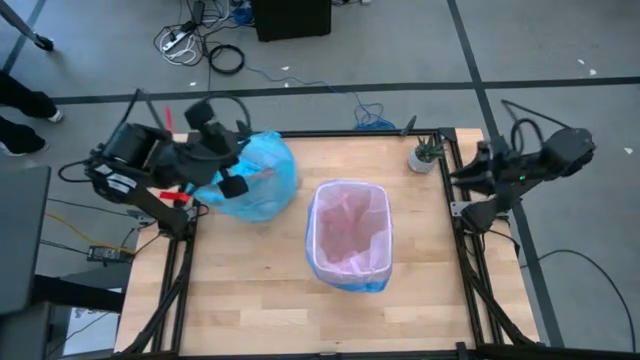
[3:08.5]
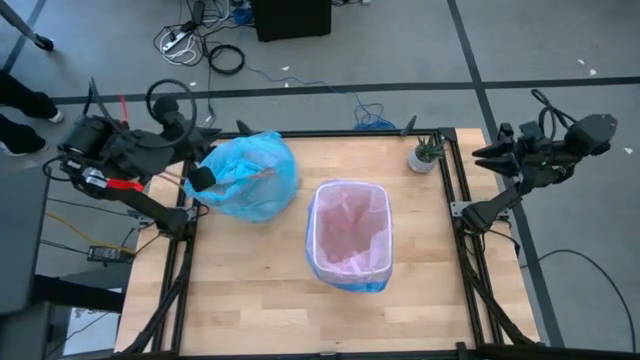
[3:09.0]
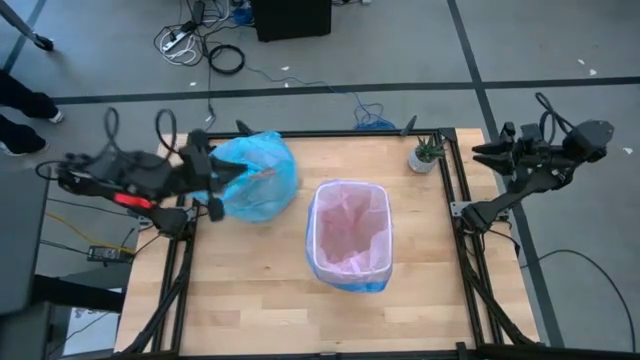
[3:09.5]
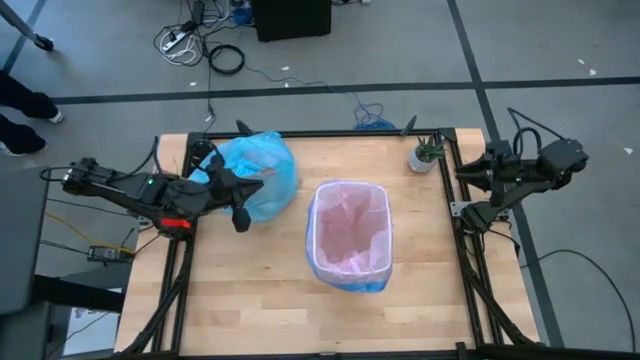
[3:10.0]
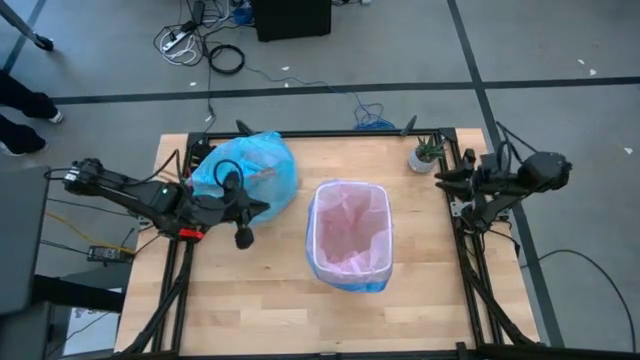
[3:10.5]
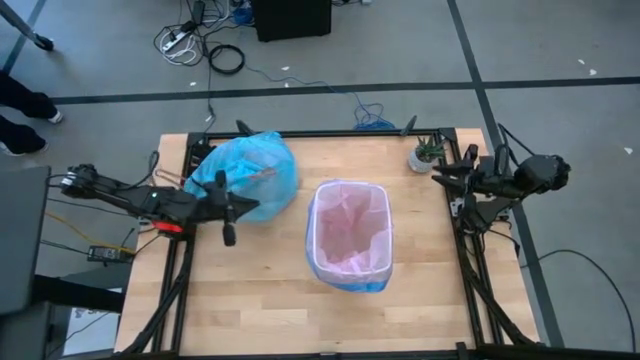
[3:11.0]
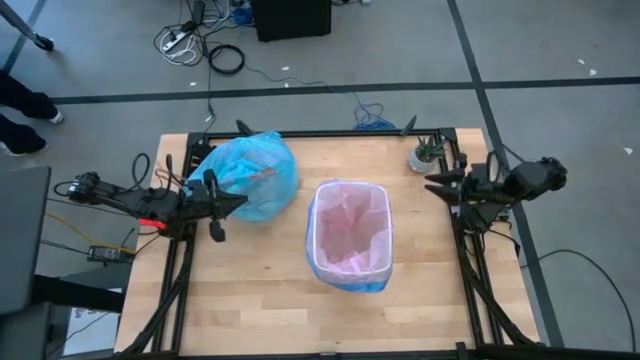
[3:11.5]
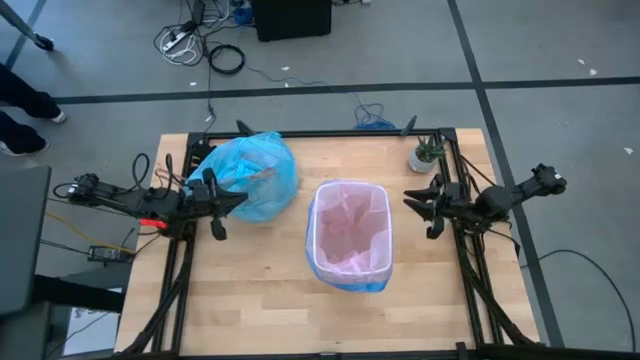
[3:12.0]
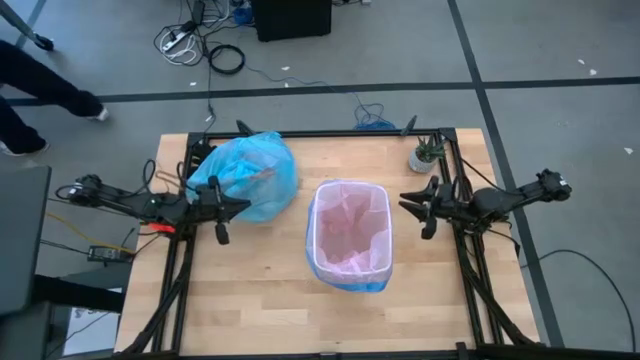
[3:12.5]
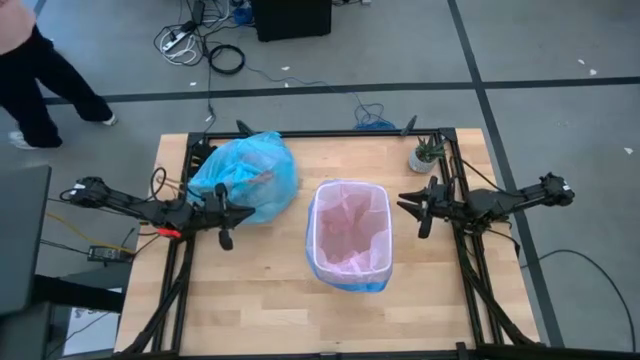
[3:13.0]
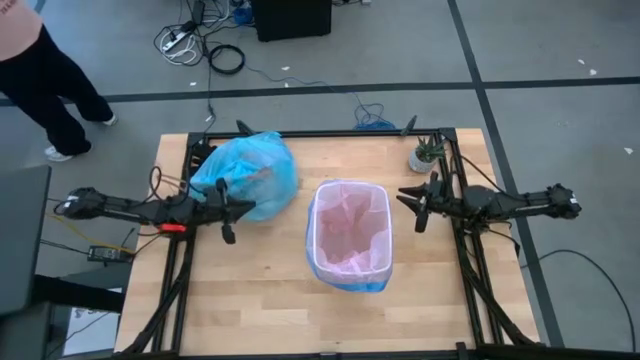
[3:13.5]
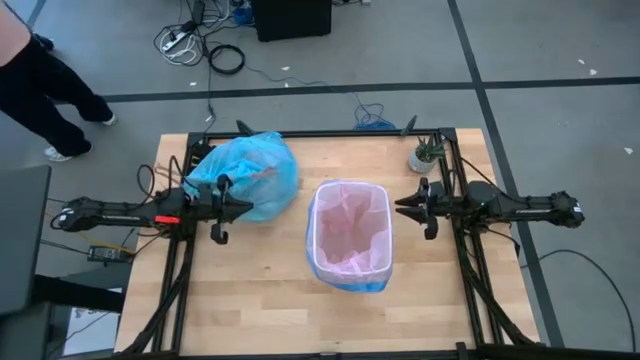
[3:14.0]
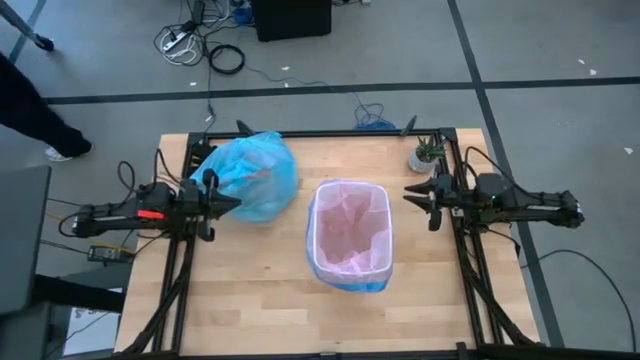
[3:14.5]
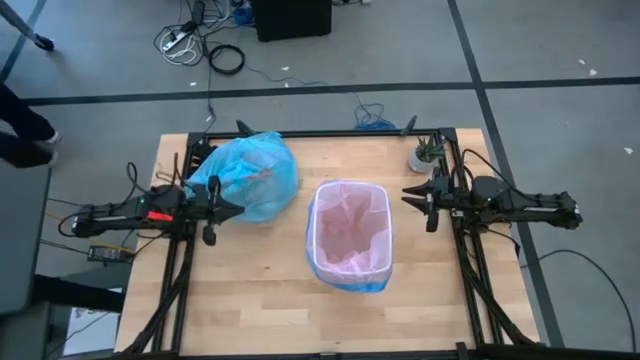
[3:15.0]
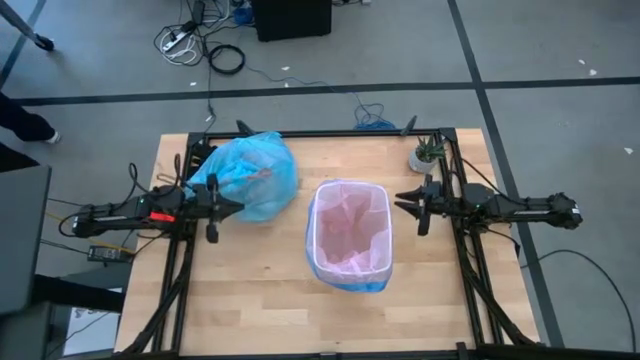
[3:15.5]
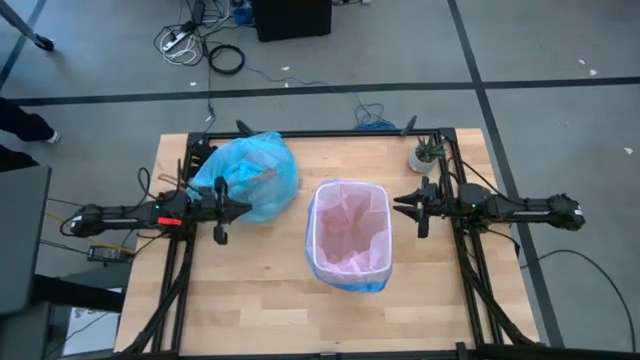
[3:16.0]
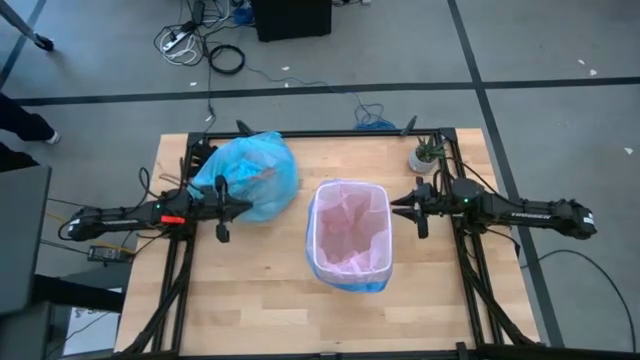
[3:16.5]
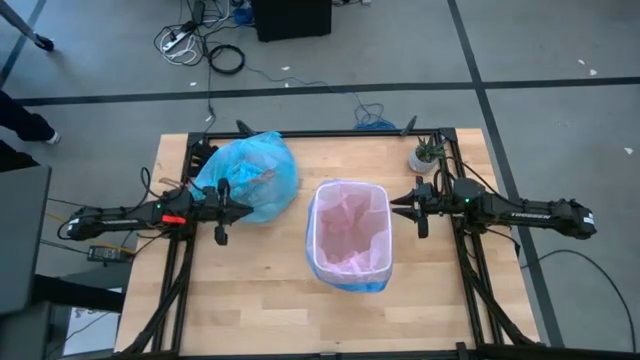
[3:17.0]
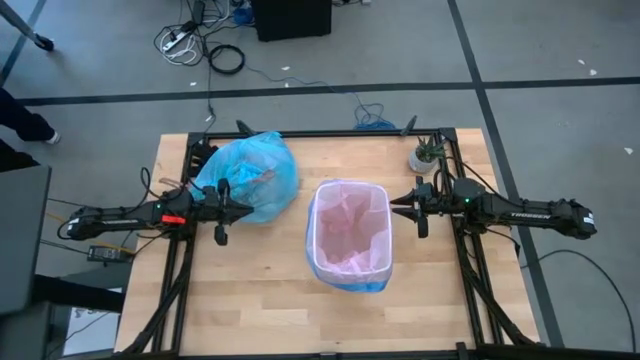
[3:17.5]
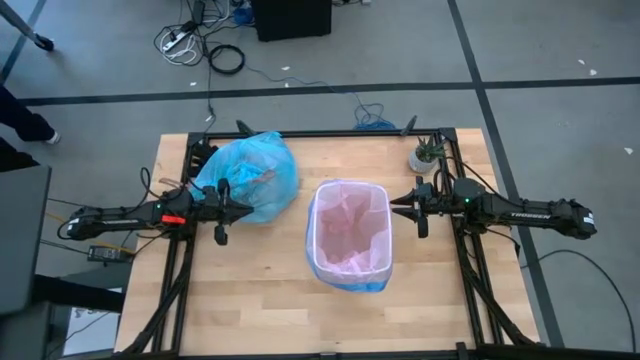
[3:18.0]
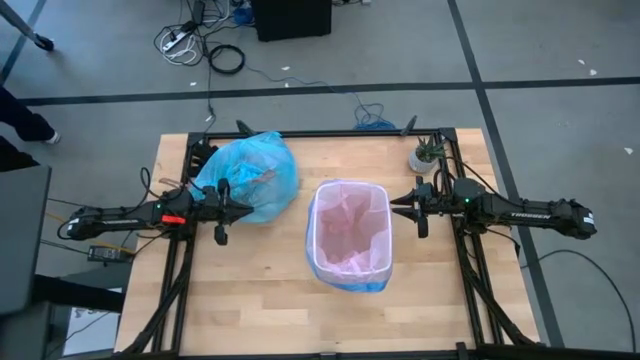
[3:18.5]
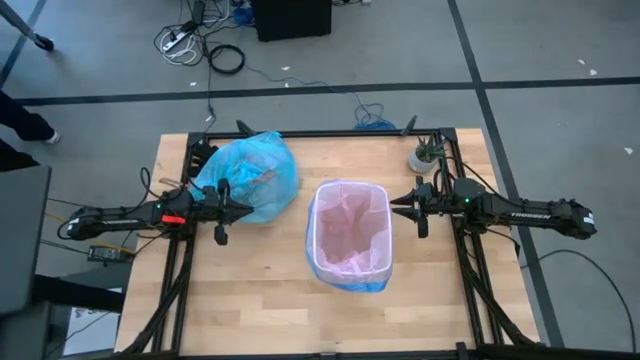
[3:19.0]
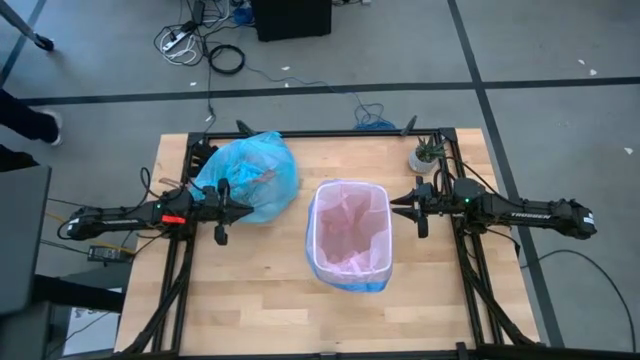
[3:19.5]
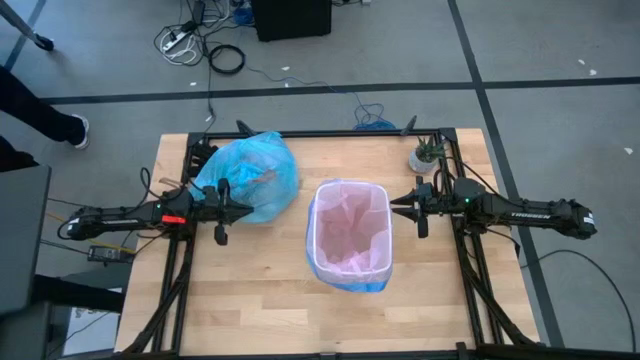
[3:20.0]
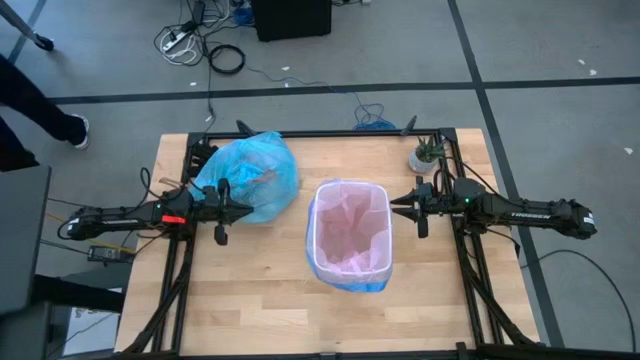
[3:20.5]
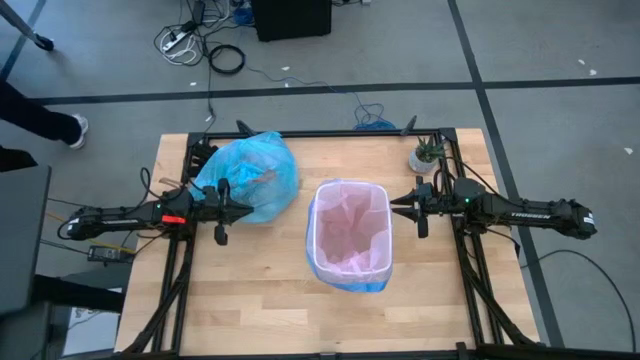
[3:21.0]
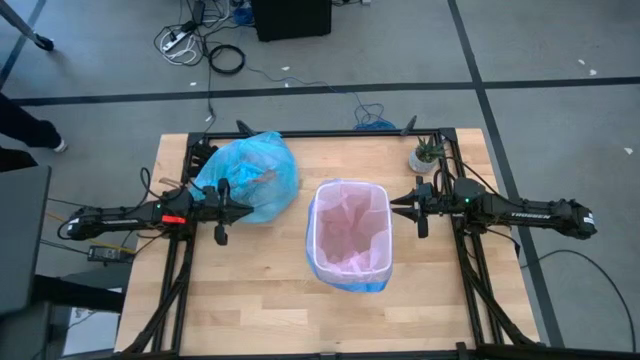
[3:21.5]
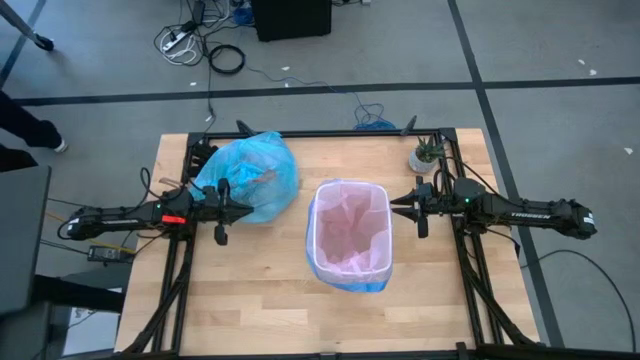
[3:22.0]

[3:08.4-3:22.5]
Task: place trash/remove bag and relplace
Return to Home Position

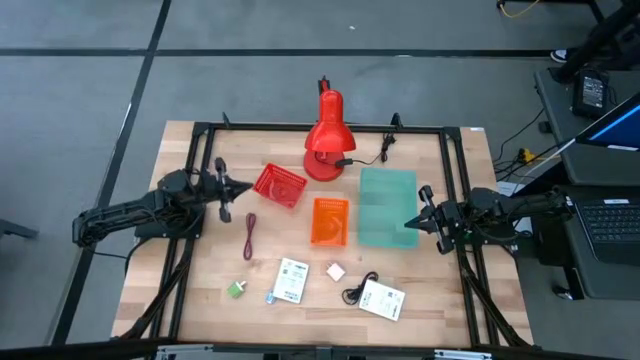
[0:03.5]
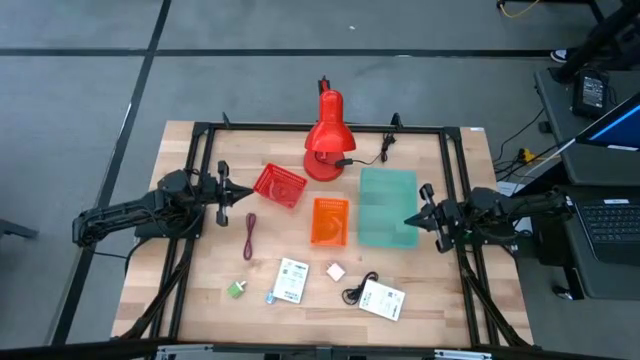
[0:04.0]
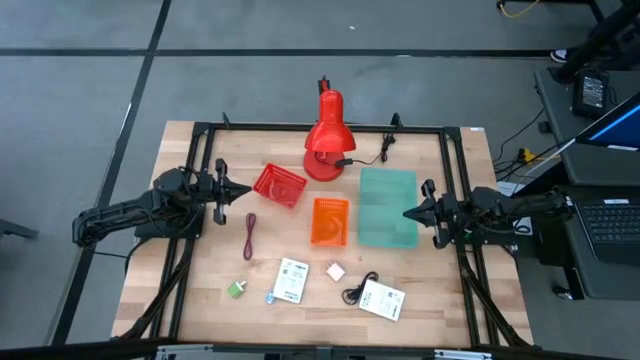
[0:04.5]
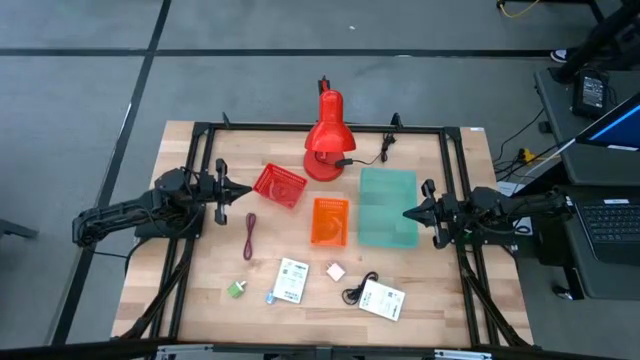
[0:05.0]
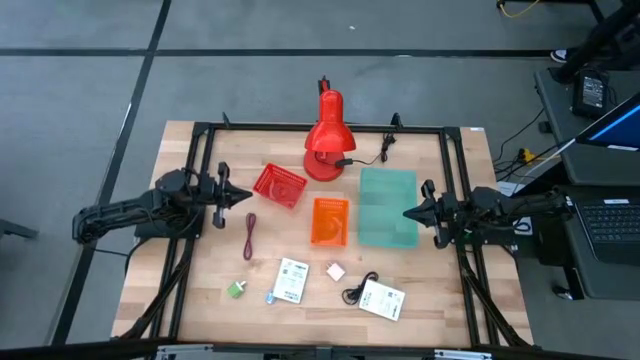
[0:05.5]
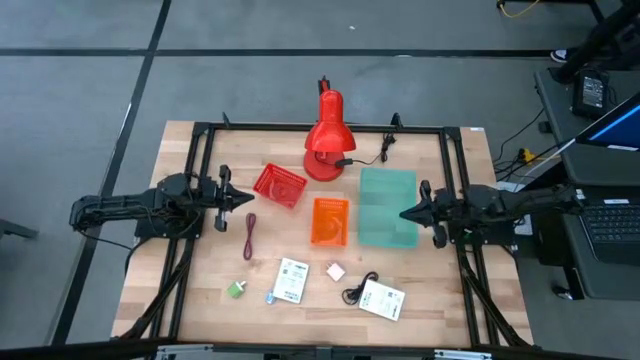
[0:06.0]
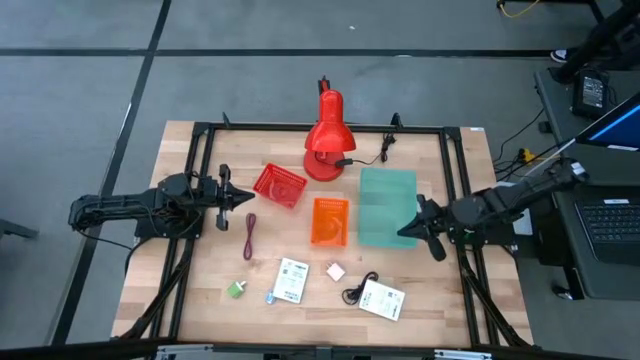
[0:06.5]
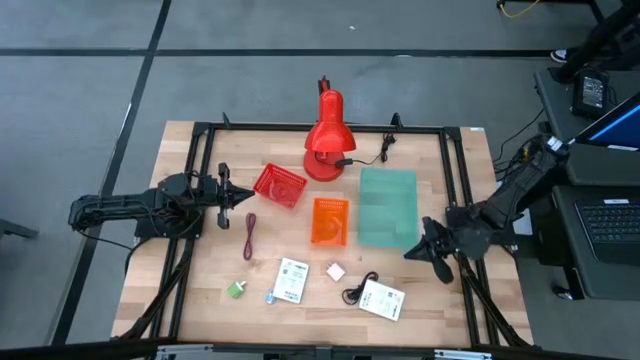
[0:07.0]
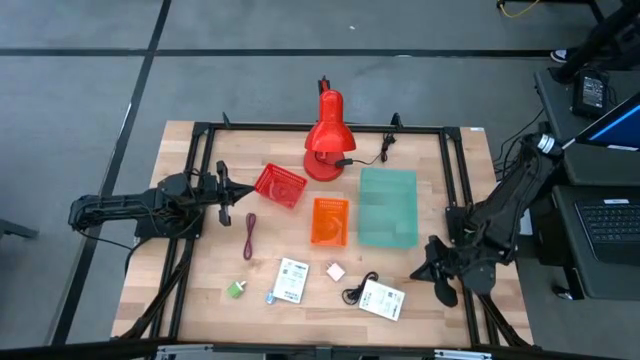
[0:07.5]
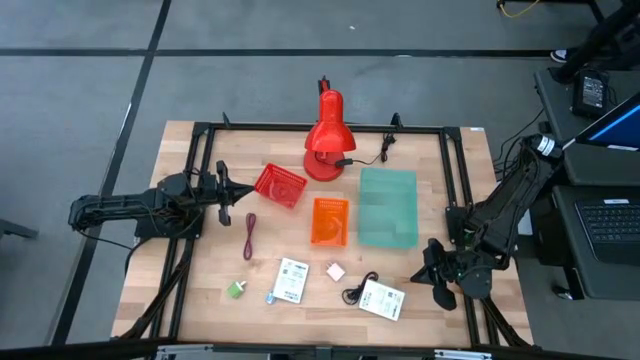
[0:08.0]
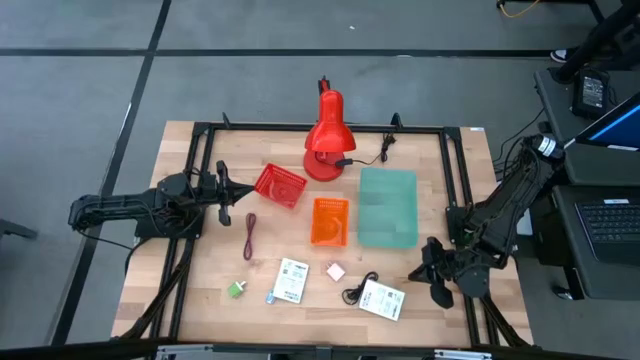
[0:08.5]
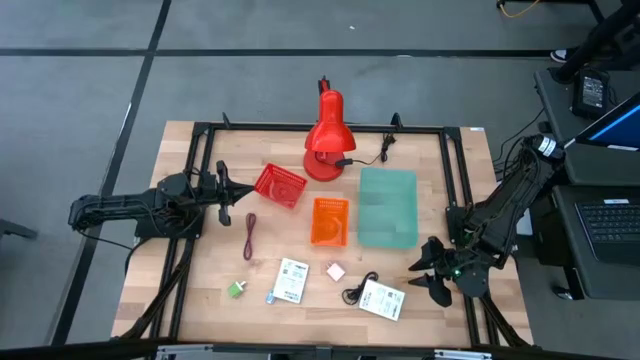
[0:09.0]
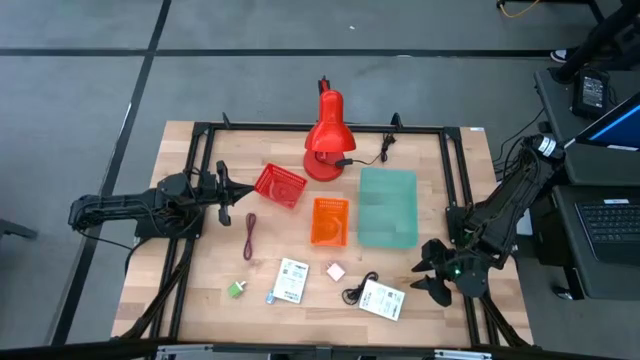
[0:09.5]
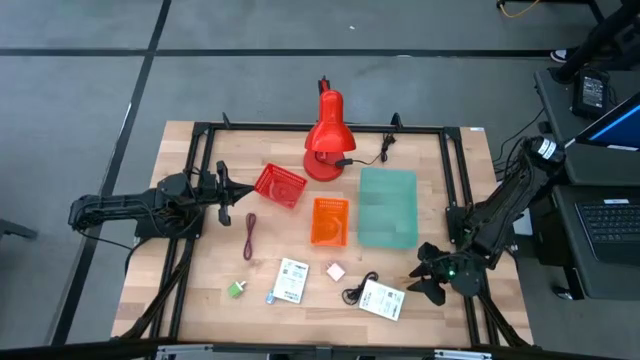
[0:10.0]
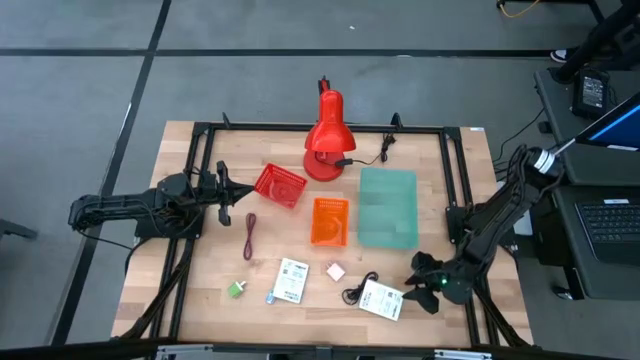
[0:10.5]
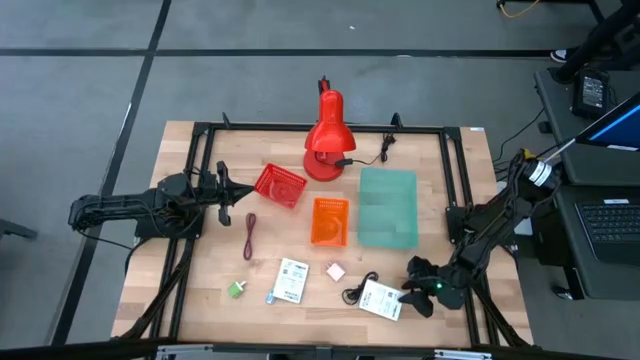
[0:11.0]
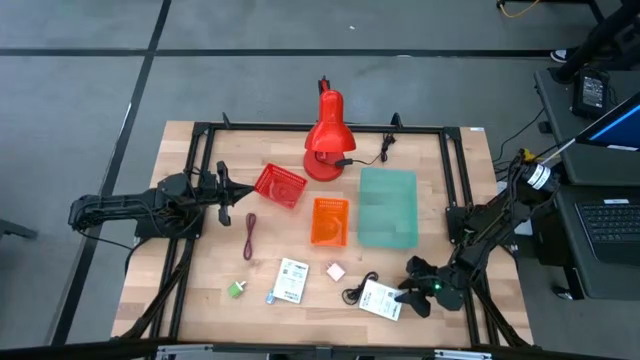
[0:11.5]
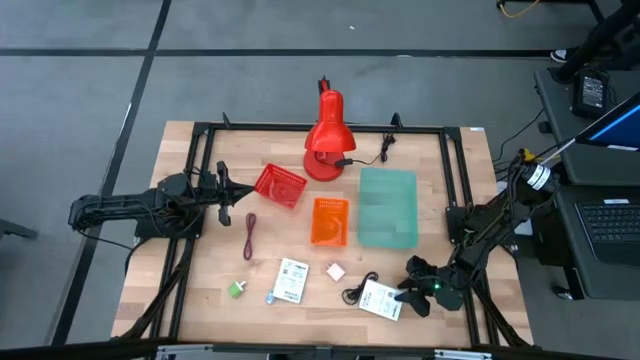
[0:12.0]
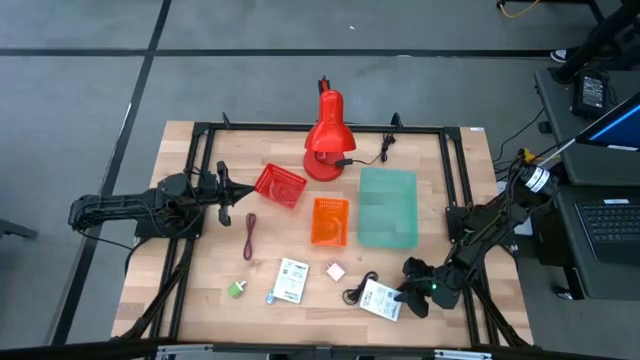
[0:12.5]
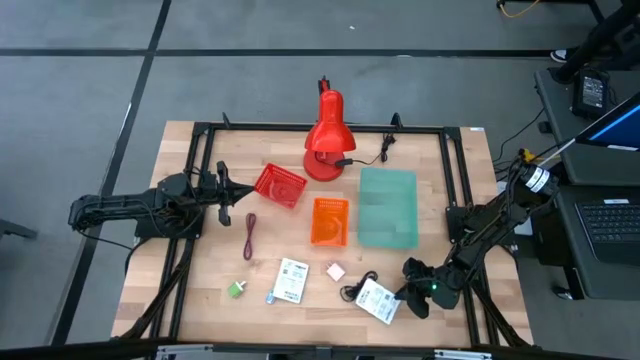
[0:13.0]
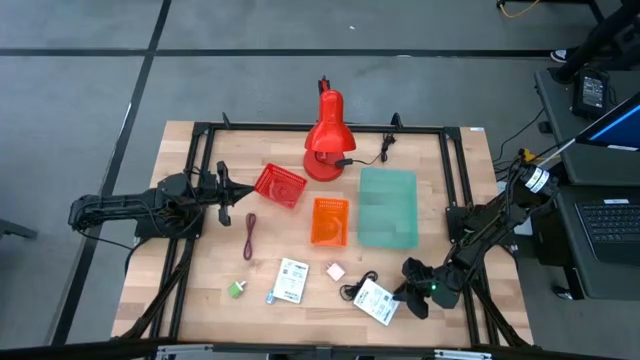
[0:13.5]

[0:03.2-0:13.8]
Task: Pick and place items into bin
Put the white card reader box into the light blue bin
